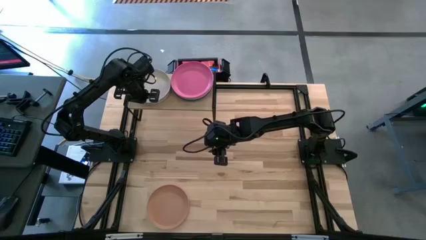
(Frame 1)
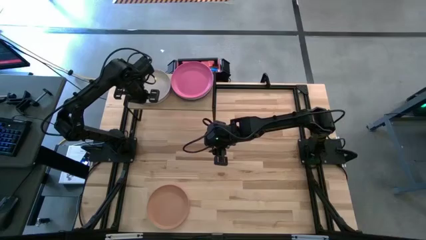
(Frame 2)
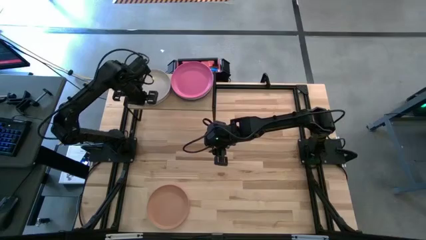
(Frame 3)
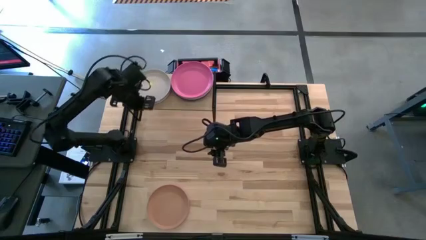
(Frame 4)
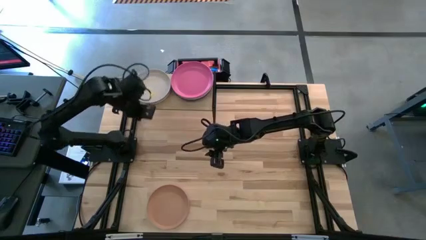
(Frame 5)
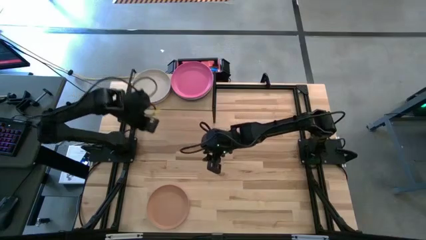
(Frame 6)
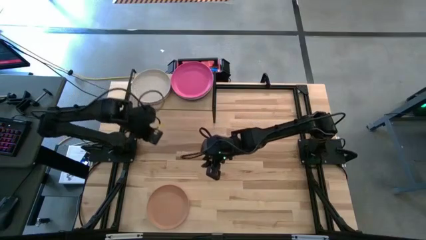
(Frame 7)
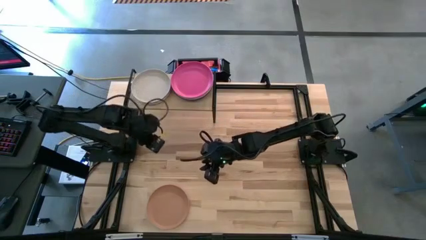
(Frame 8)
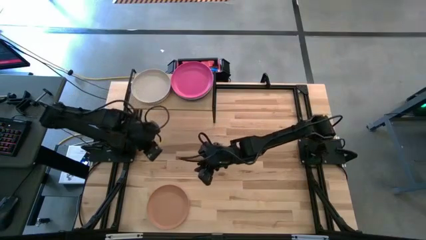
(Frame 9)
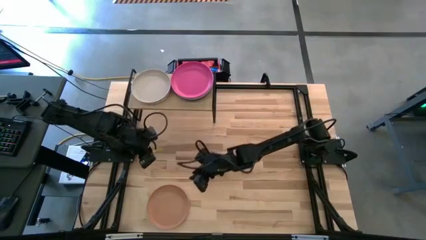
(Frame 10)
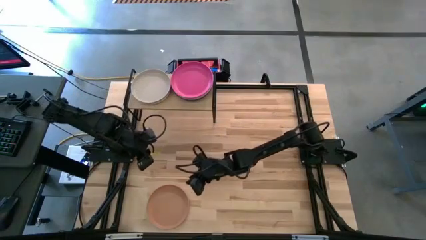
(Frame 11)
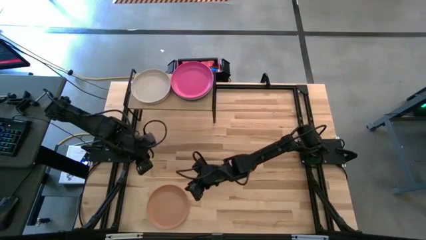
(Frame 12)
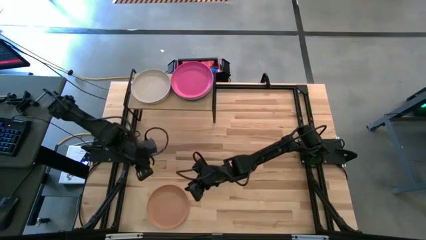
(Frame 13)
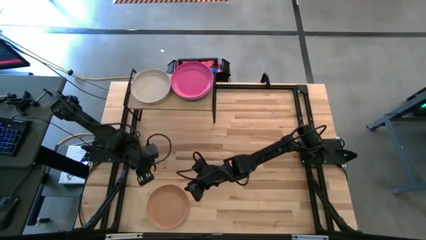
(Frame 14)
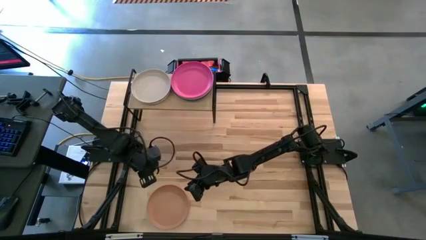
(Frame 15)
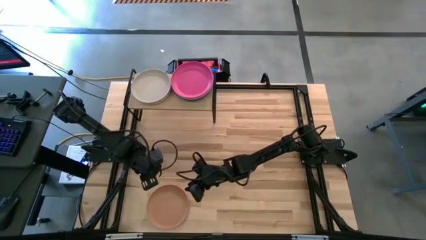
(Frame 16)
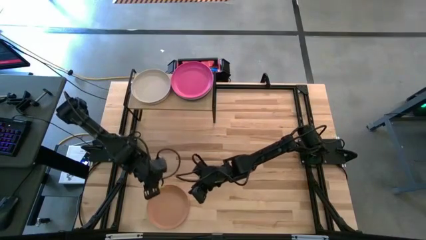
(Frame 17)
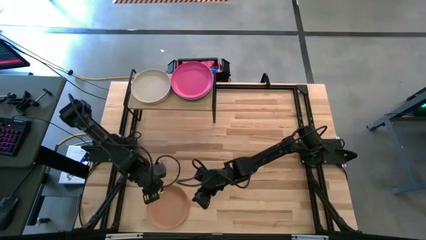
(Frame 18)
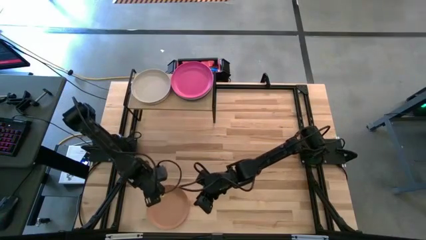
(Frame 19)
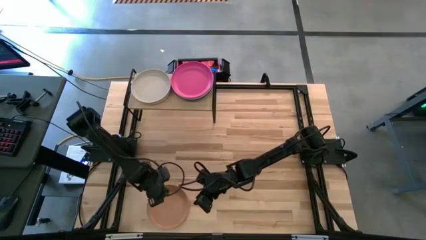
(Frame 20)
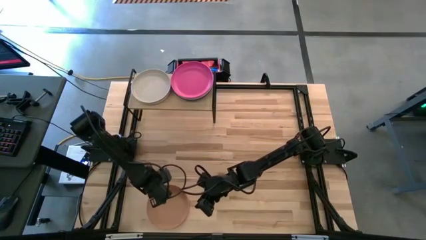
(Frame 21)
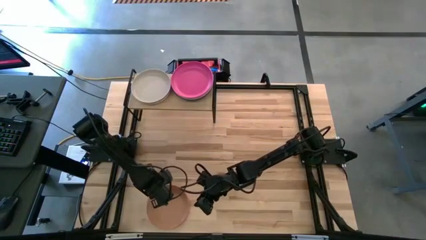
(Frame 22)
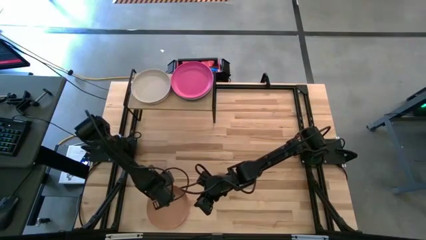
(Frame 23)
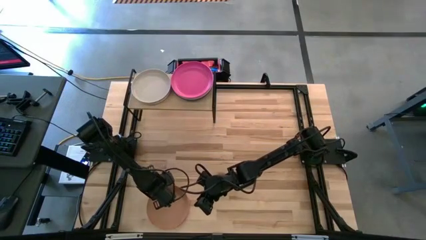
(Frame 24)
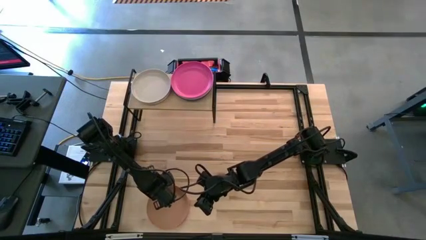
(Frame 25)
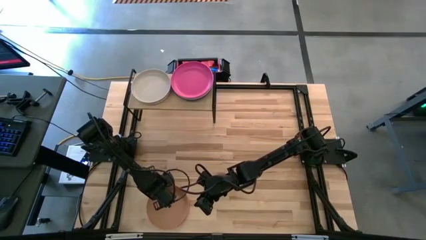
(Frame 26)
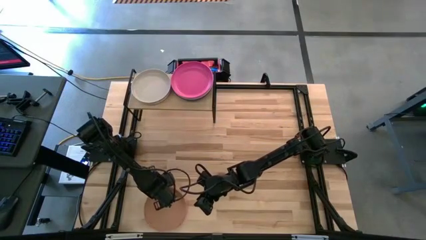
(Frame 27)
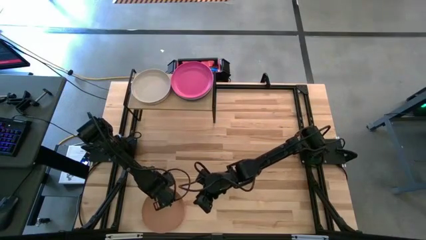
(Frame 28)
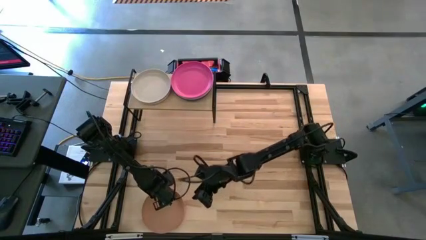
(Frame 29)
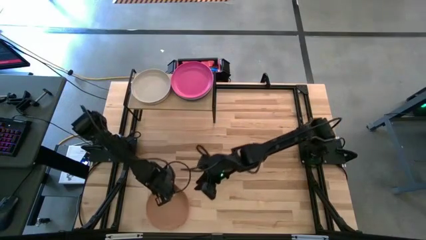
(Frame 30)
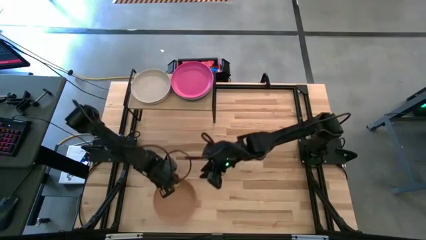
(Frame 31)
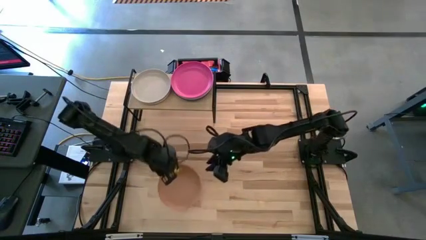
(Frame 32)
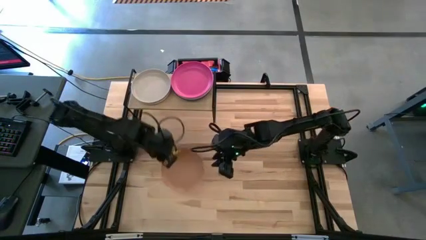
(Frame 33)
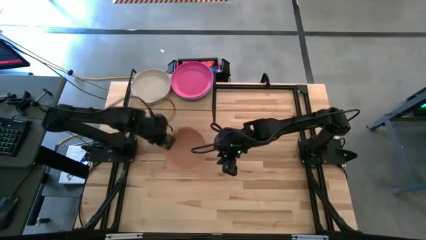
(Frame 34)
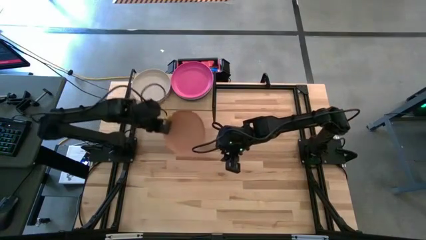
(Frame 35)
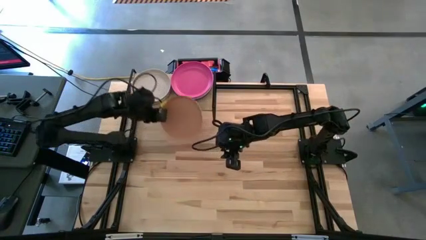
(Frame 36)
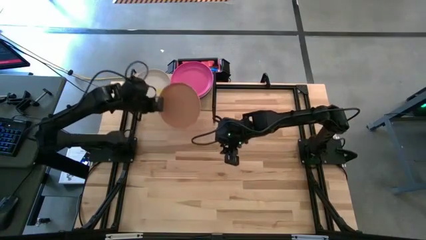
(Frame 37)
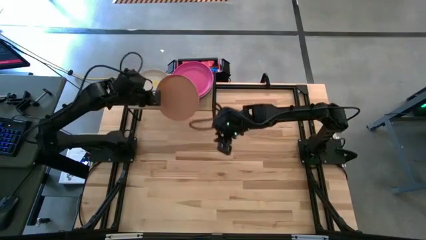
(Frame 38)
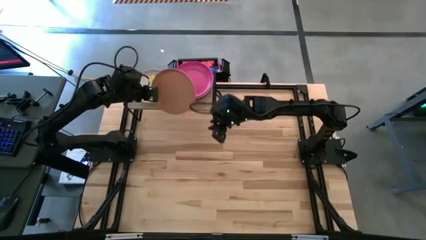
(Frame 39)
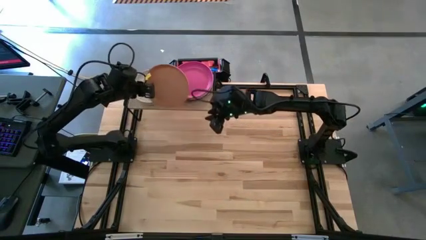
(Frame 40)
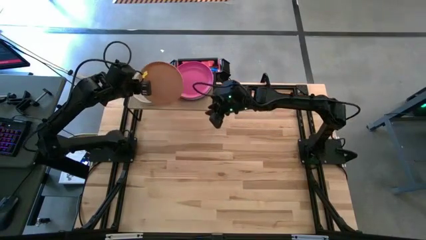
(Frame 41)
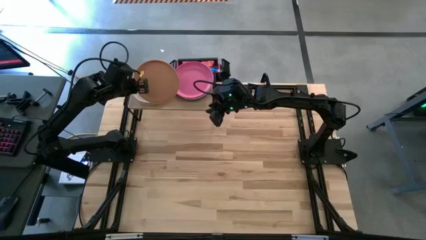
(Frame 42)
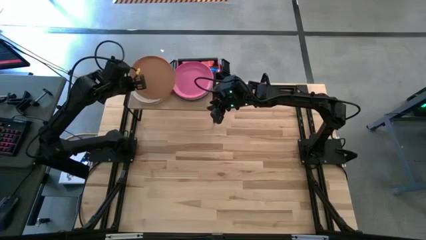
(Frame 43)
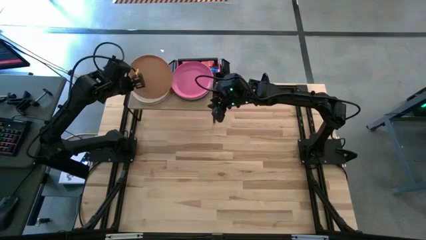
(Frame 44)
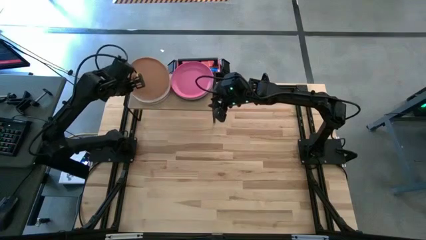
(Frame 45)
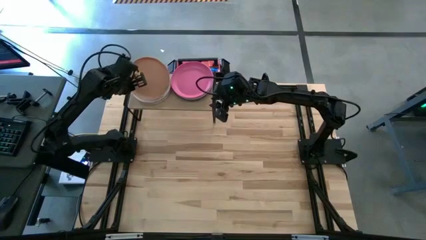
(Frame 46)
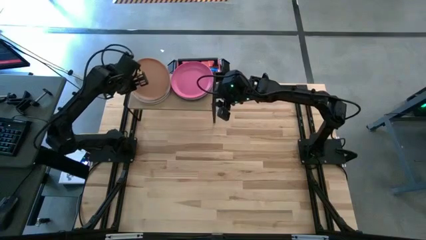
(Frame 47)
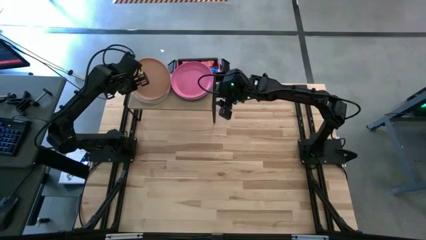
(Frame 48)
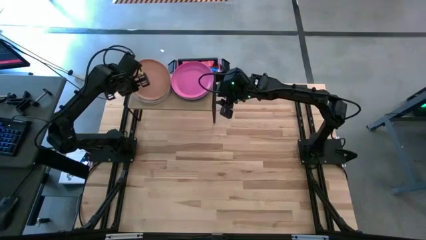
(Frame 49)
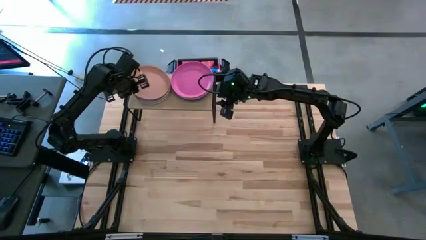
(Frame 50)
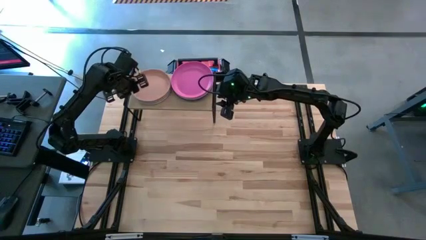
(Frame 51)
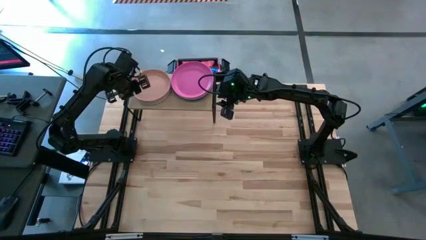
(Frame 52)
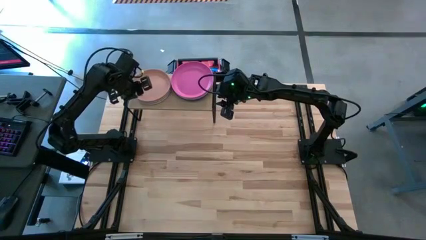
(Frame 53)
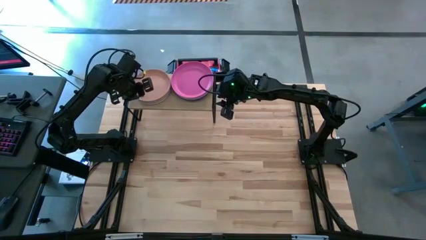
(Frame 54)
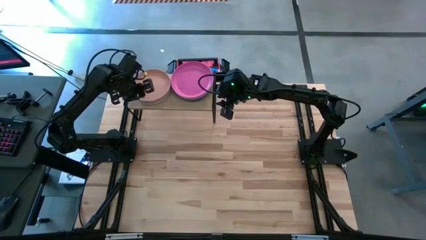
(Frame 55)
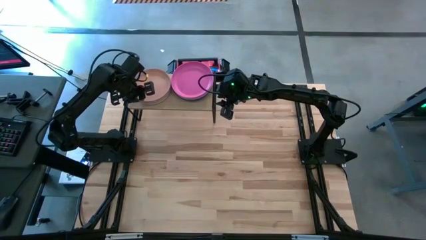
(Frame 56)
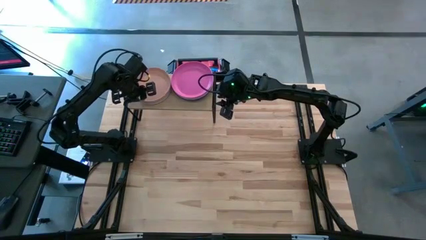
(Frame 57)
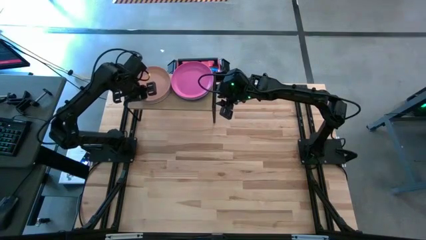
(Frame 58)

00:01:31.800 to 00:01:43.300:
Task: Place and stack plates onto a shelf
Stack the brown plate on the grey plate on the shelf

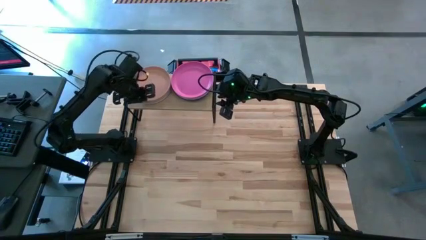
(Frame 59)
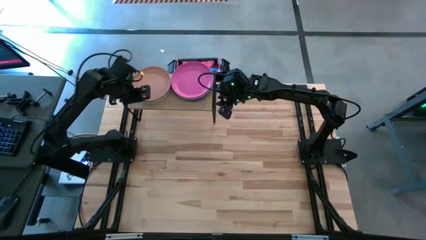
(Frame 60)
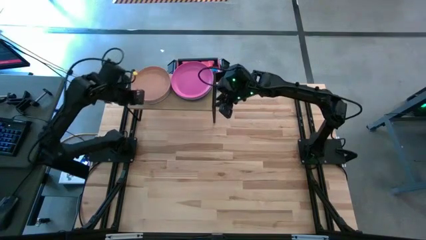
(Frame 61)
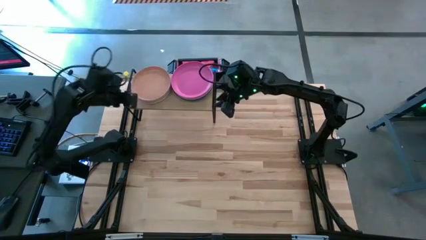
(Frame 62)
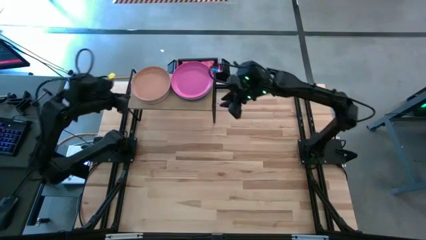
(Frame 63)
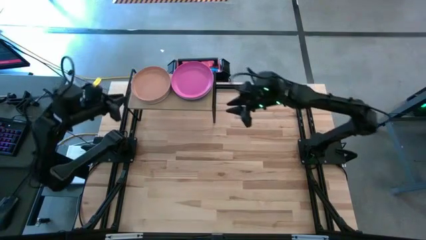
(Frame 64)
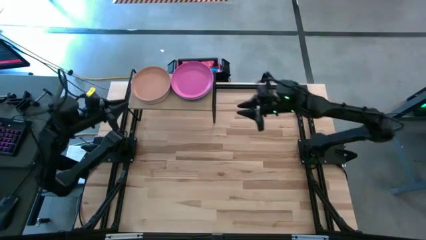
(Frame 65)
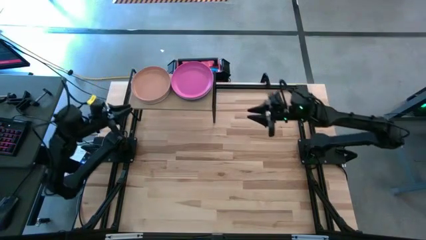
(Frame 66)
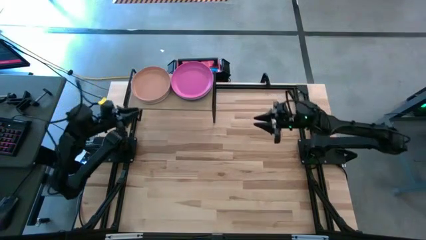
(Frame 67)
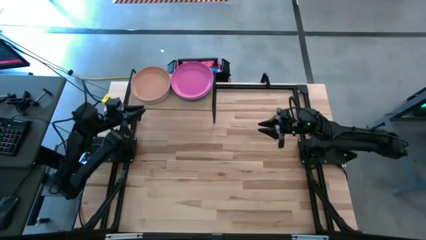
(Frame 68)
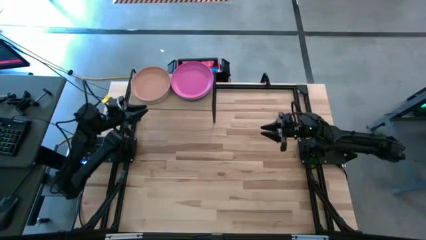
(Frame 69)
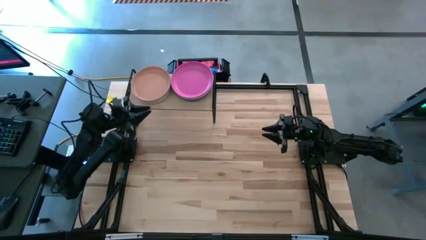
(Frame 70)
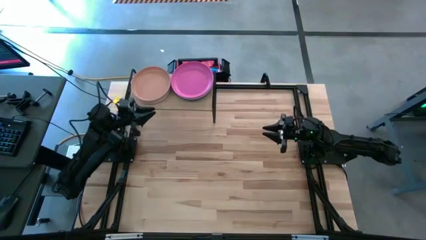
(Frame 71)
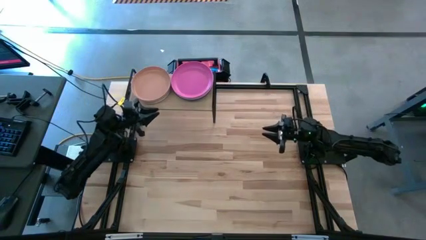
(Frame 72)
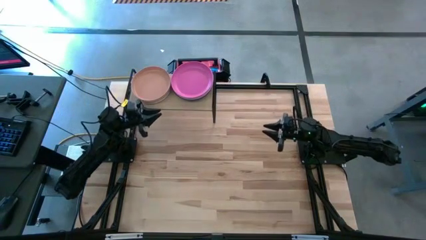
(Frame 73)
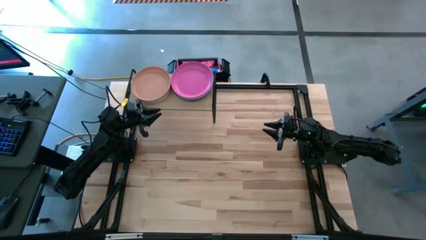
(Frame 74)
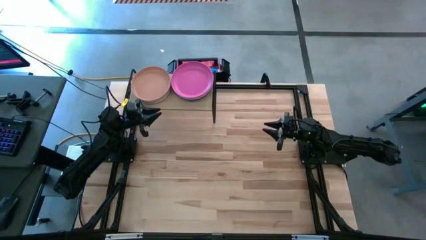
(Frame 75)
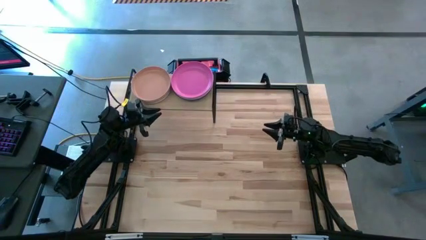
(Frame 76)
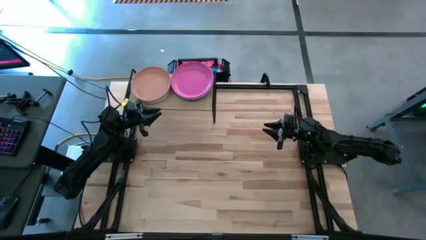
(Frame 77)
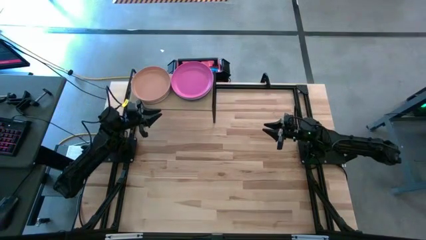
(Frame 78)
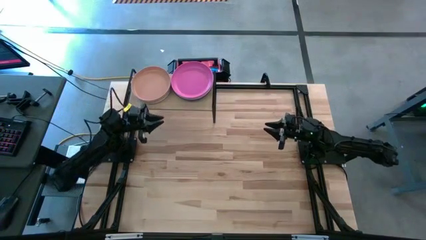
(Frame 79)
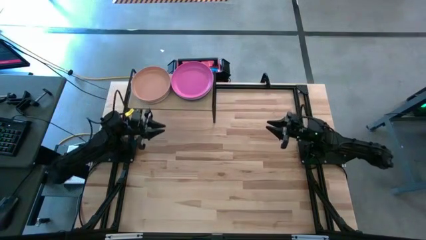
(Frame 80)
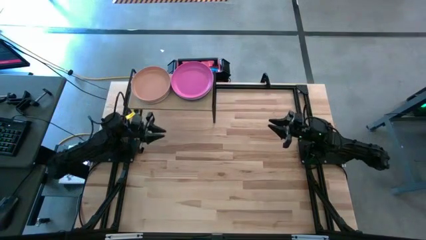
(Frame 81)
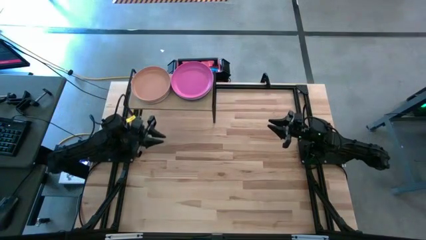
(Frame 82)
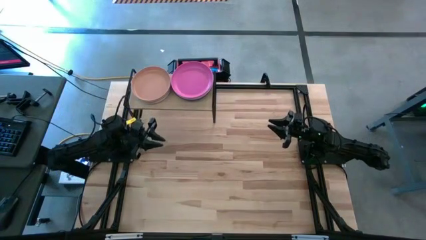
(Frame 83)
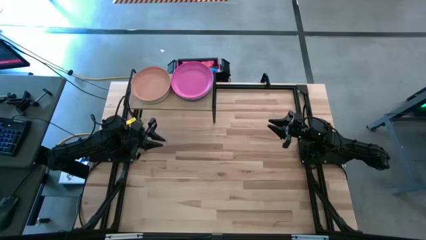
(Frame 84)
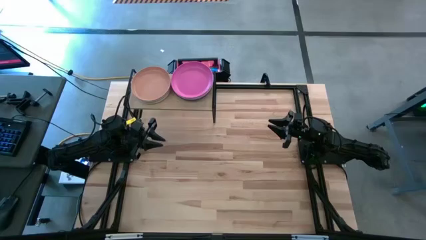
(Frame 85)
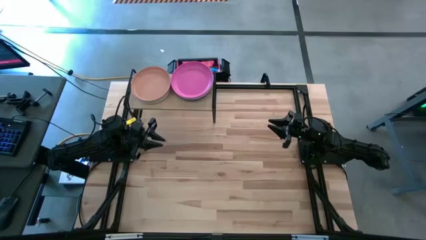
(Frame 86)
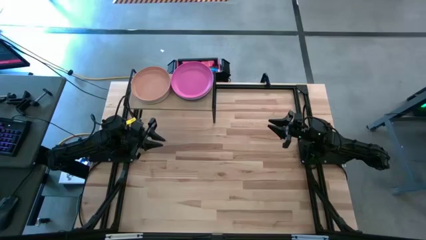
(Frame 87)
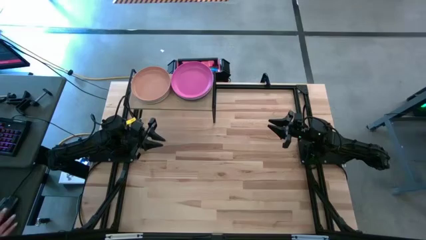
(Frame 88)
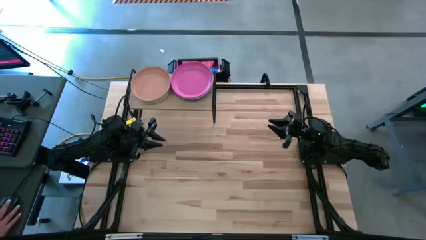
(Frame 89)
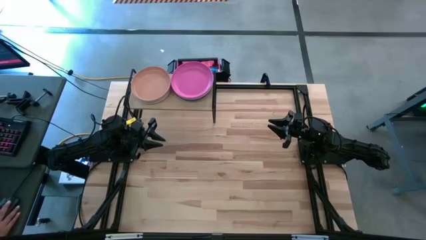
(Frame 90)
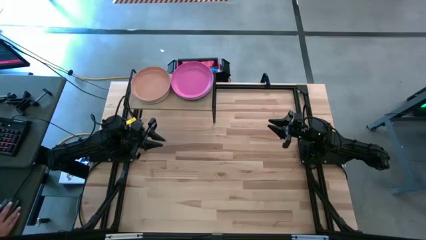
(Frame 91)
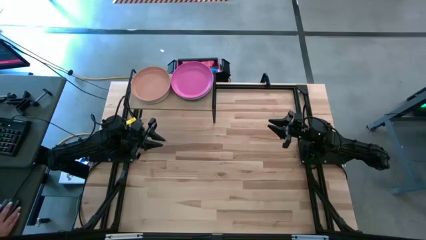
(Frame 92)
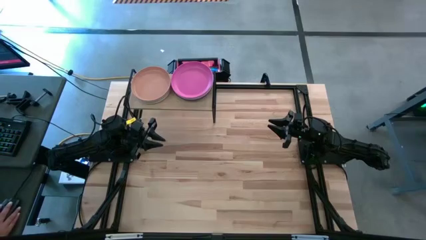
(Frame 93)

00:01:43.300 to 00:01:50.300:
Return to Home Position
